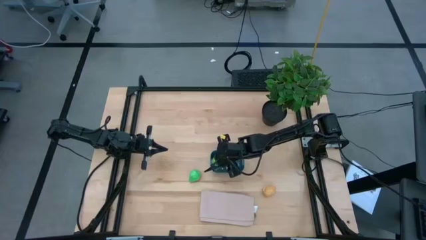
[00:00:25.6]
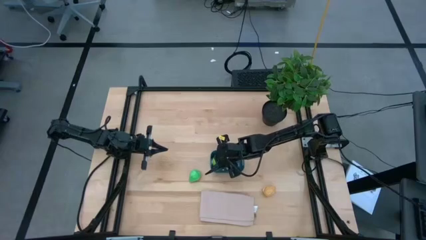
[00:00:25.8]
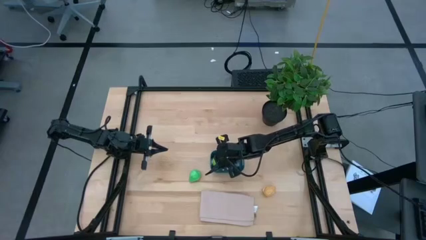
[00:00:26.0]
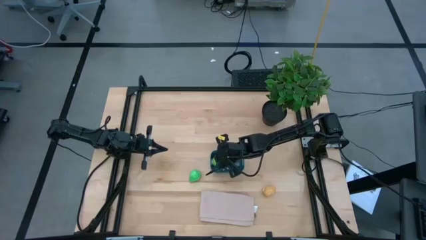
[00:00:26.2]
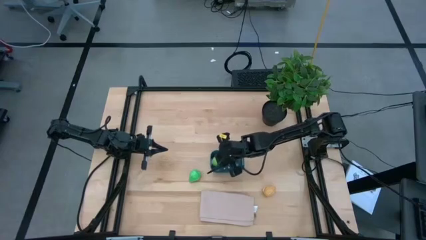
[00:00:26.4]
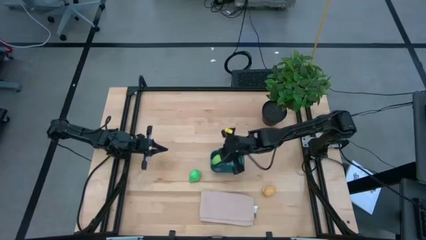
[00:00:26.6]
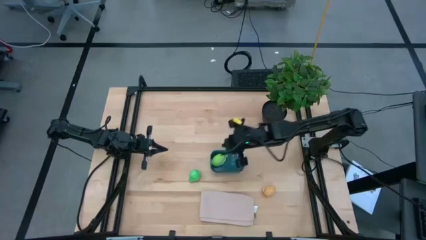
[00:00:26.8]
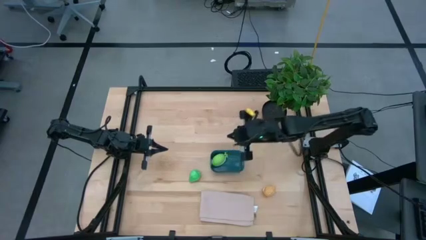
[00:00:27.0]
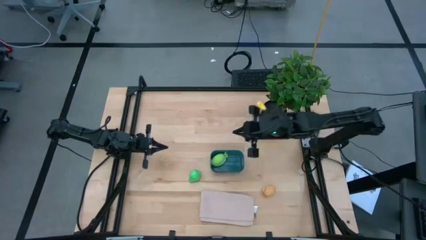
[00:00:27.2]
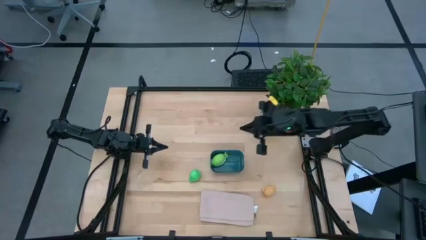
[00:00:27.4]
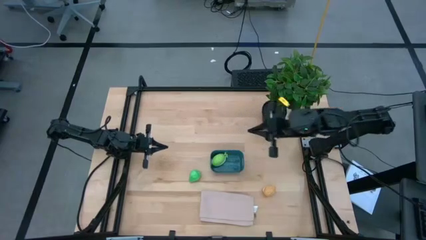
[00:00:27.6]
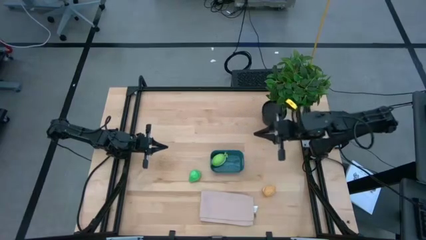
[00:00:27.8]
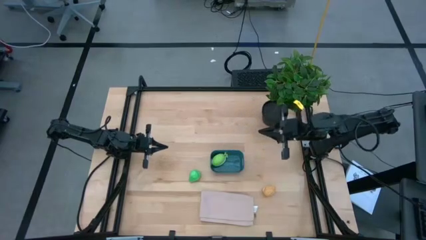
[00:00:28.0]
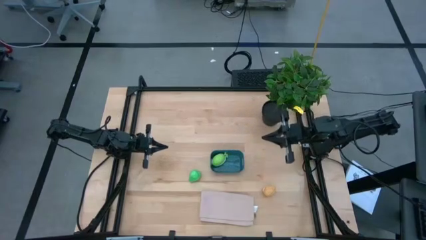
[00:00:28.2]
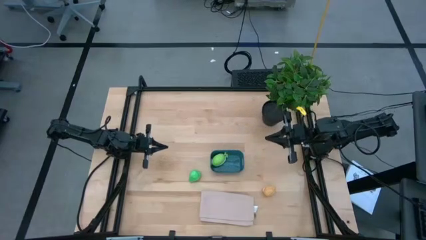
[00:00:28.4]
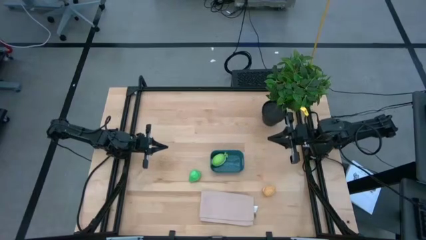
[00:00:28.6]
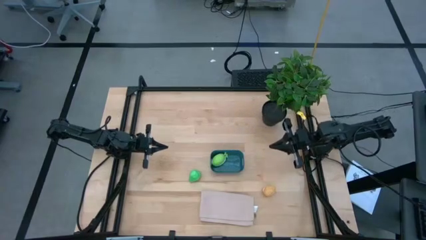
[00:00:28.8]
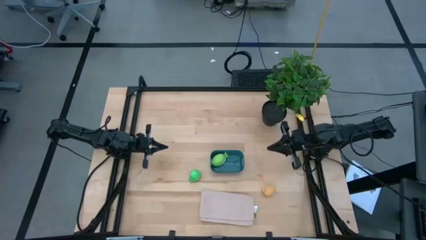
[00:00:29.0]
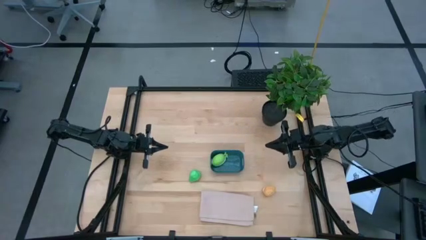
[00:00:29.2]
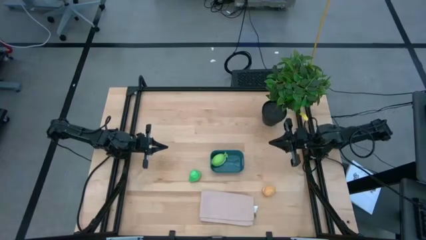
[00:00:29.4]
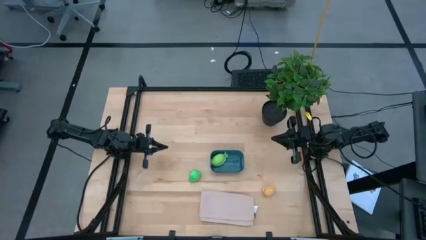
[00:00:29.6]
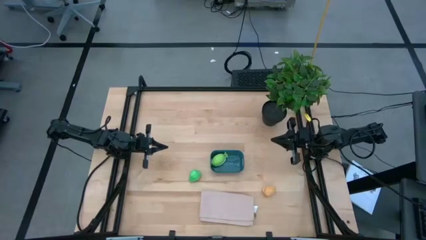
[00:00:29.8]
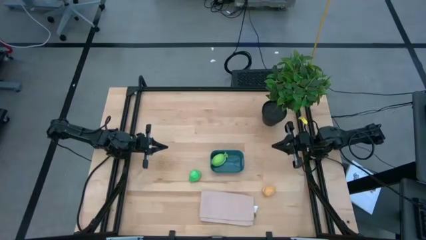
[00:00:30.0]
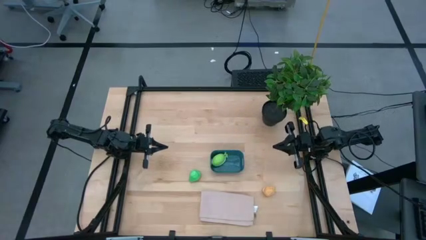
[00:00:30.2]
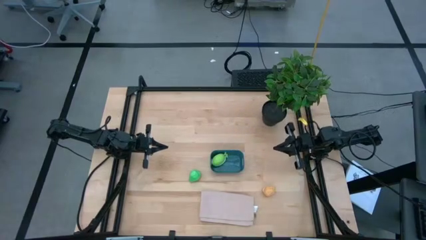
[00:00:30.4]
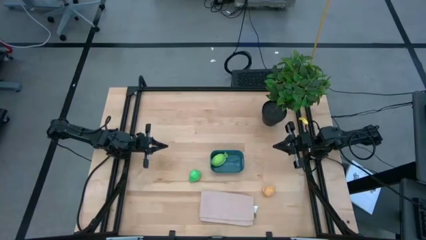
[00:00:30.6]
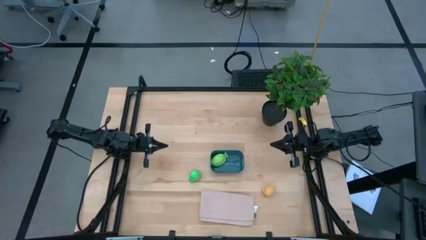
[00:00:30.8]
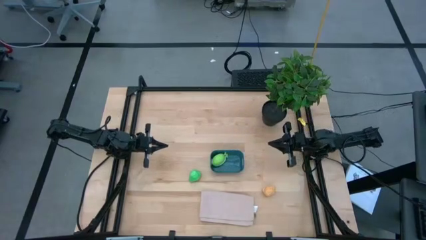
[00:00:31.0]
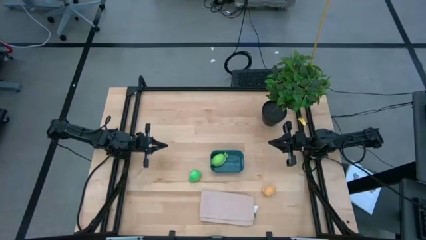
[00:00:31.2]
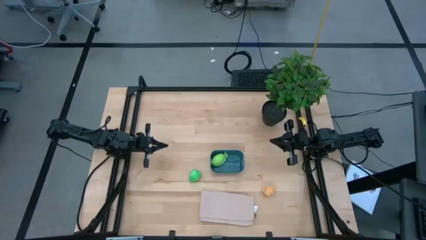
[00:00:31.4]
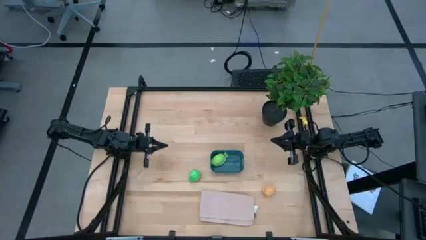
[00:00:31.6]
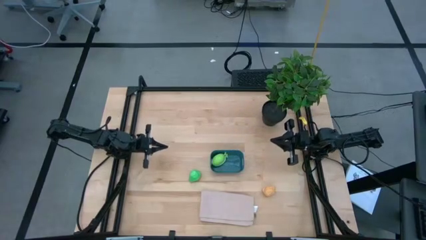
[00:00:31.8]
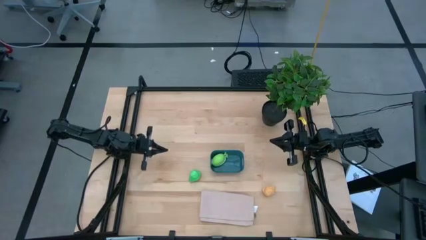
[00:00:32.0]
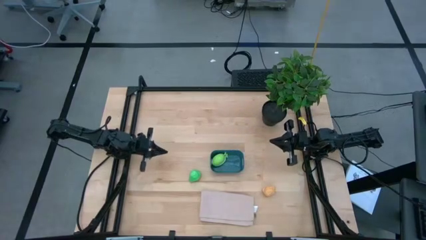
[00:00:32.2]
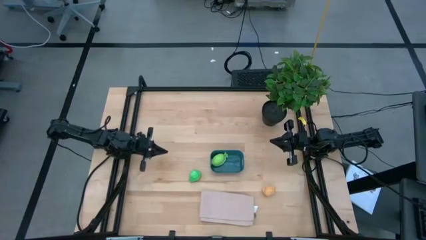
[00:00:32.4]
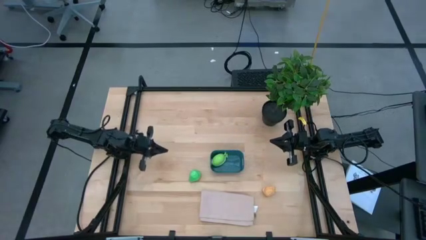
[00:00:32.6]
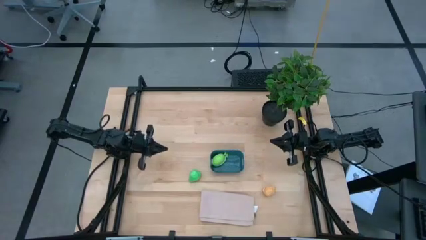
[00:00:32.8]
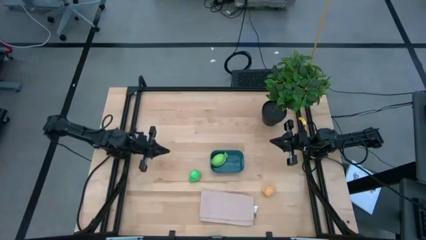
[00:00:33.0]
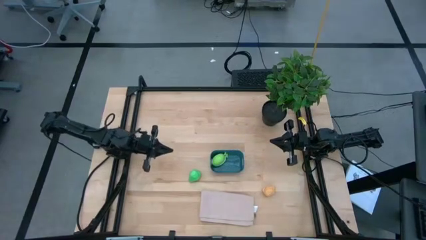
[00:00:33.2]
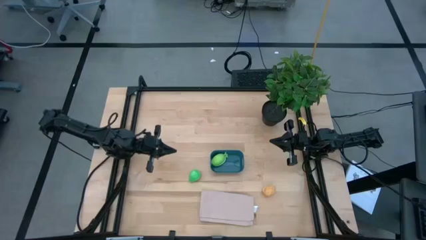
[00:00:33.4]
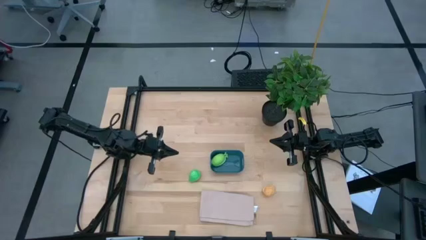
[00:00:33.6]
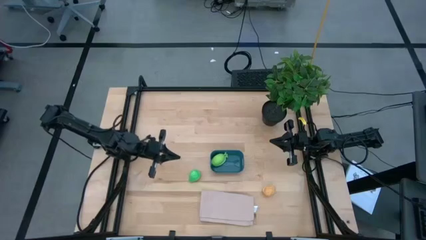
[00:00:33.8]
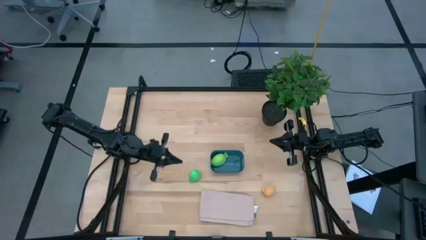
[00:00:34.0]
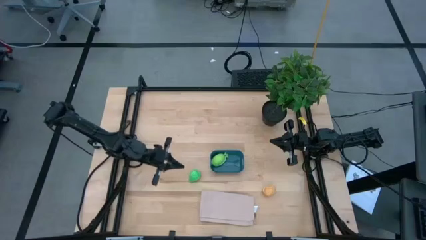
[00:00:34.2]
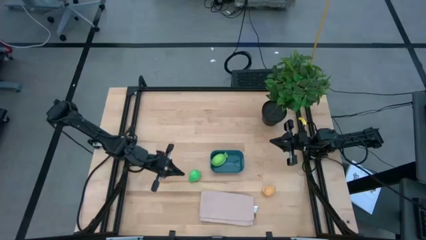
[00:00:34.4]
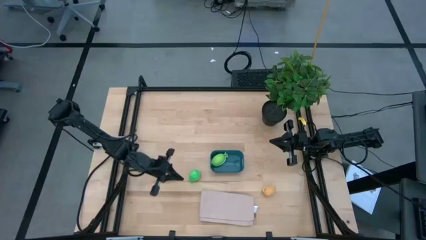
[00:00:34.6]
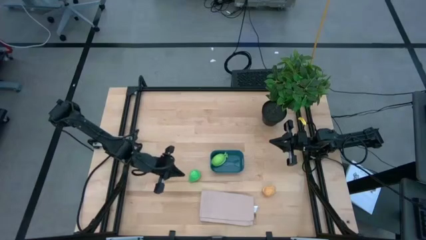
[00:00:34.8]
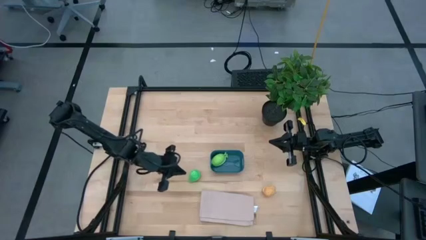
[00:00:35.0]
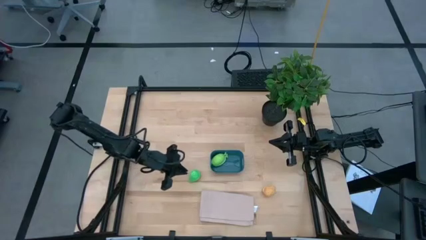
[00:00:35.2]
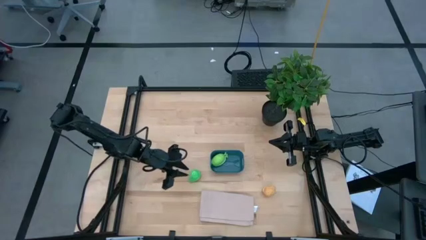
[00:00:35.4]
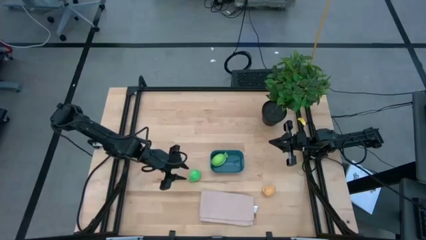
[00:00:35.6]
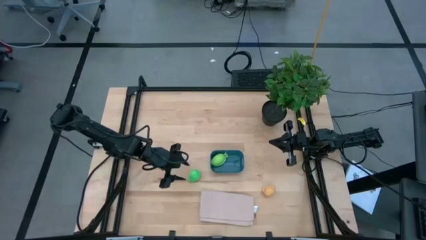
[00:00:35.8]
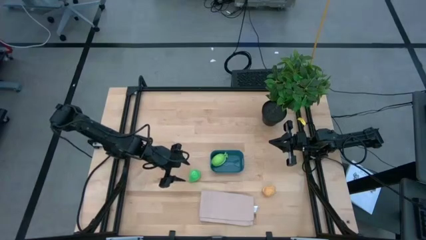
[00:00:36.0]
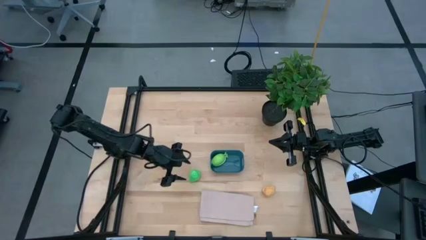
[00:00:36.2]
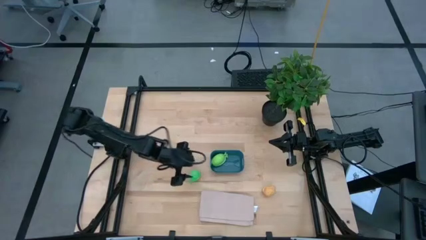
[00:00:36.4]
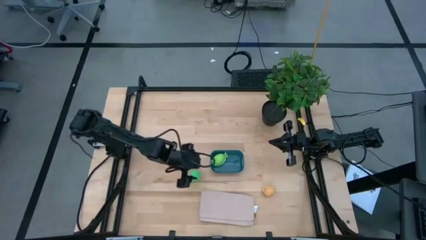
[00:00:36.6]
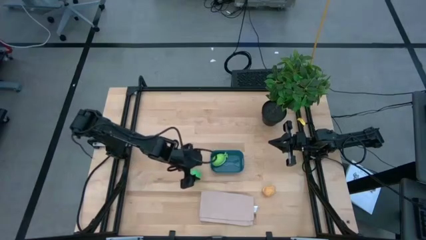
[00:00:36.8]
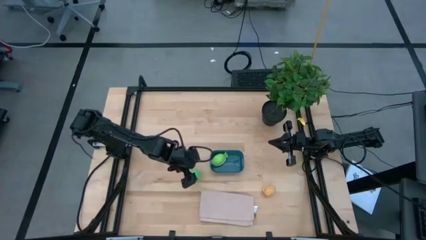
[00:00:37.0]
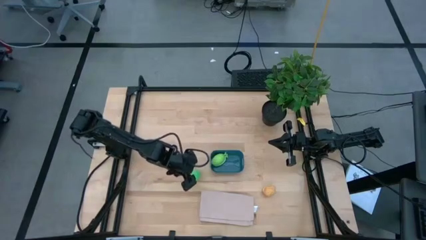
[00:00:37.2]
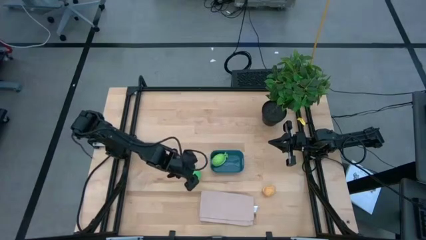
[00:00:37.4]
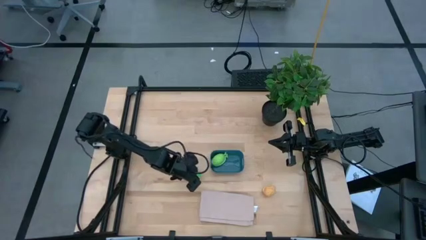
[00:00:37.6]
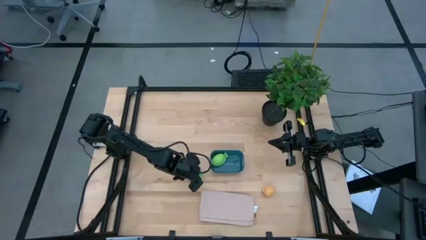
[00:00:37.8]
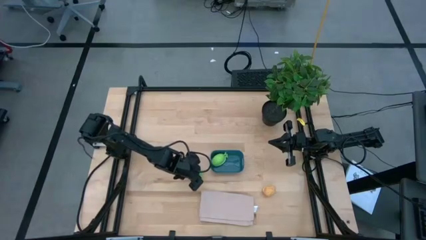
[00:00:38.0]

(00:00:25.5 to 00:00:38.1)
Task: Pick and placing Produce into tupperware
Put the green pear into the blue bin

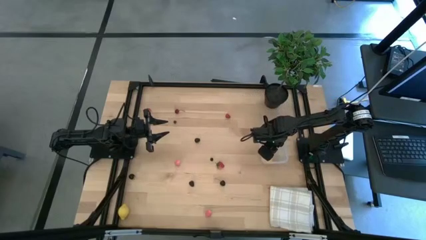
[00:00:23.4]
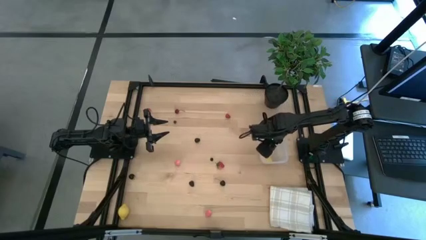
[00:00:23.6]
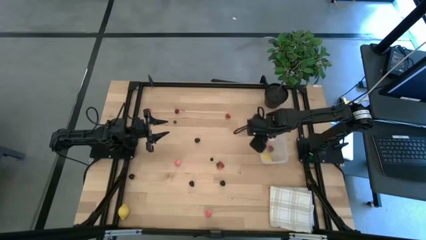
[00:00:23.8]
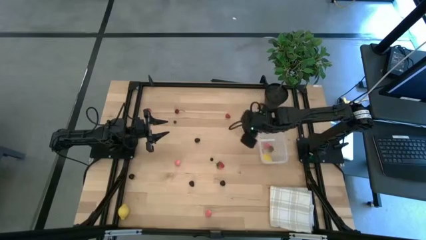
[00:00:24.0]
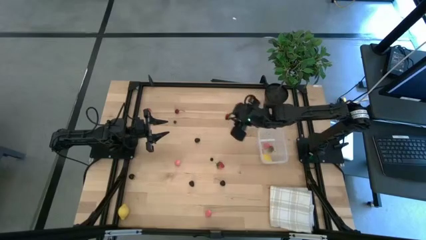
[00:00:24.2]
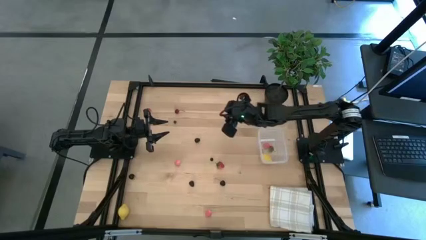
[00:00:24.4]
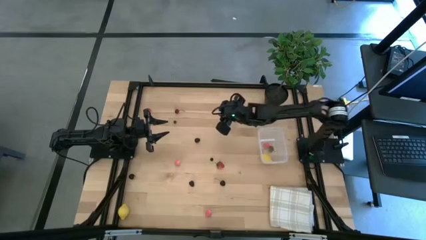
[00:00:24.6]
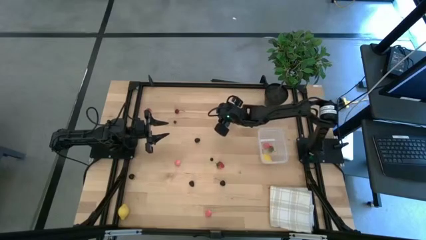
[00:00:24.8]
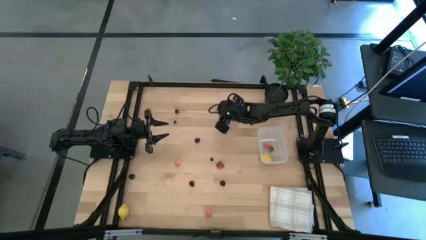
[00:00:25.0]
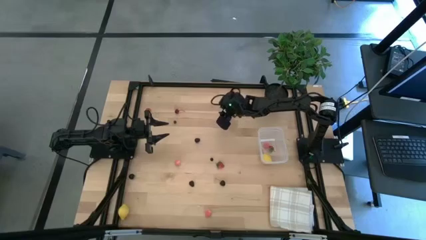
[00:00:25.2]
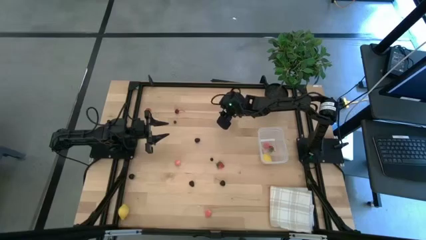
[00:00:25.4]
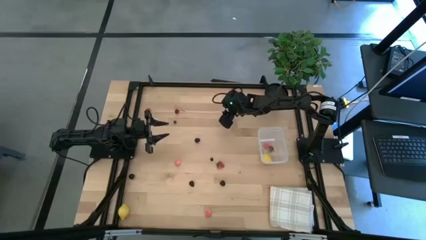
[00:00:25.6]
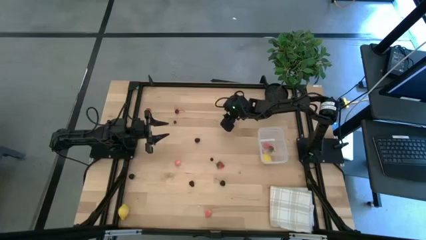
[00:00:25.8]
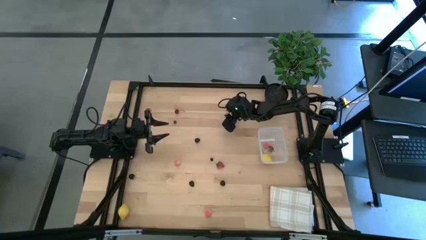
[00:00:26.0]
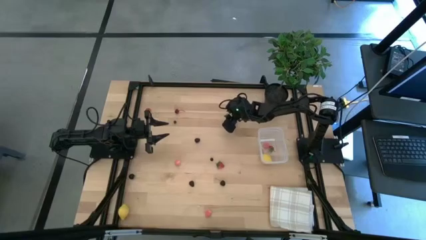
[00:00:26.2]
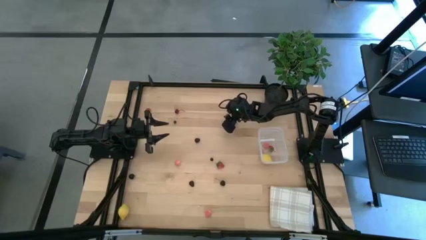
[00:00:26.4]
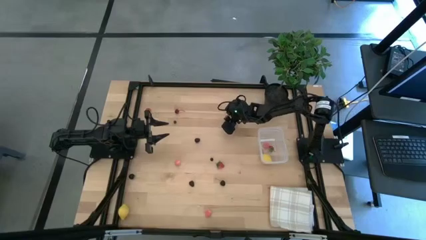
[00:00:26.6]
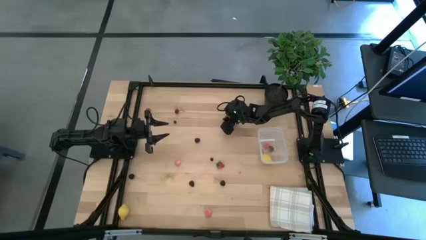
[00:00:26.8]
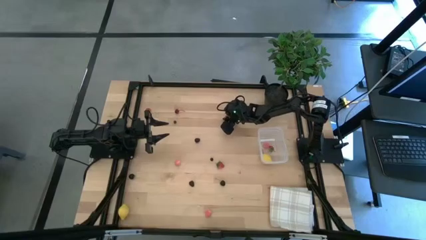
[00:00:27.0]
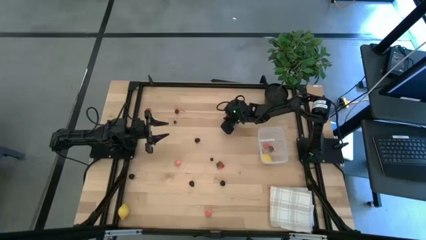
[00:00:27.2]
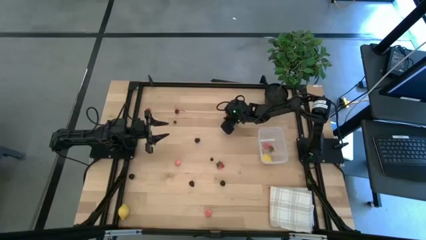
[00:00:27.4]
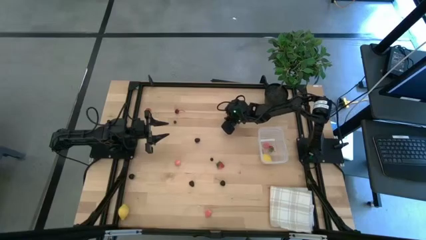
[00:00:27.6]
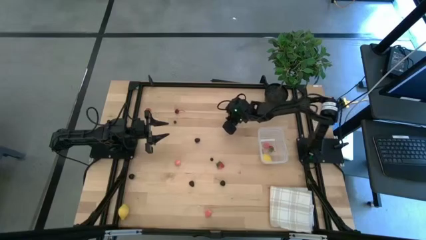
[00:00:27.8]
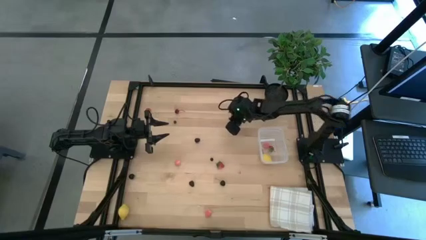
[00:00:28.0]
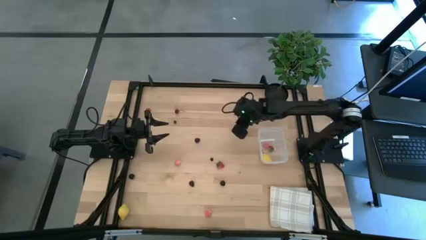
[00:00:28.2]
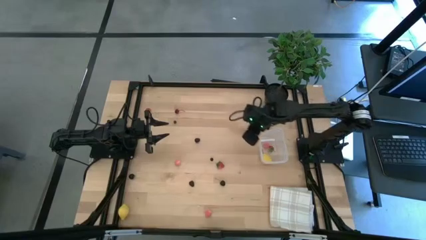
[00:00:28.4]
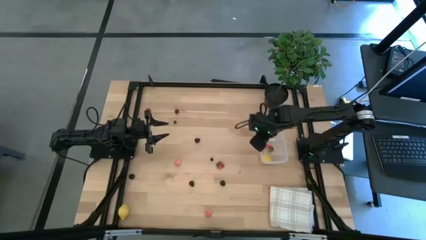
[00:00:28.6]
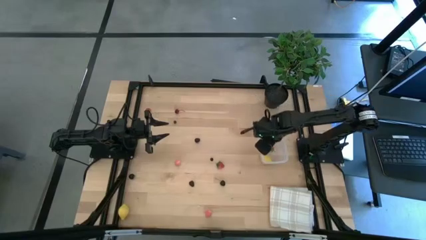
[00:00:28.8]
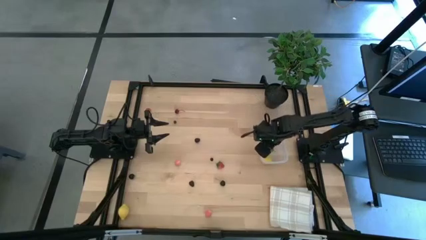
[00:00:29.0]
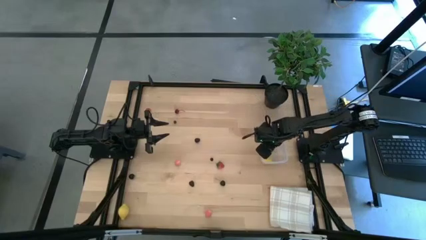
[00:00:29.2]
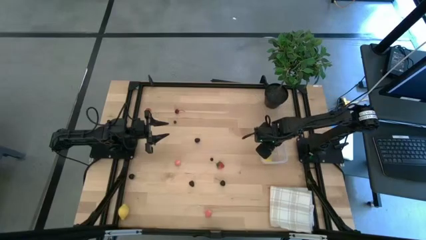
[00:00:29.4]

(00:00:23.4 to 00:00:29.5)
Task: Pick and placing Produce into tupperware
Put the raspberry into the transparent bin
